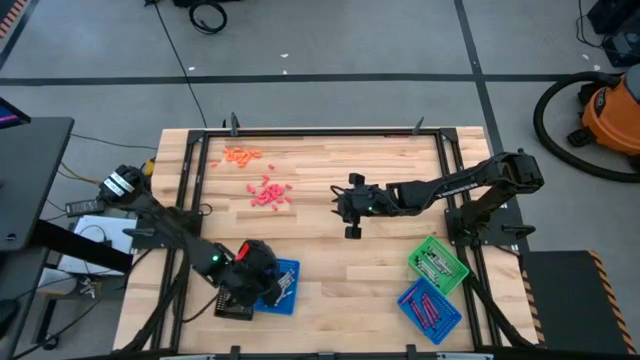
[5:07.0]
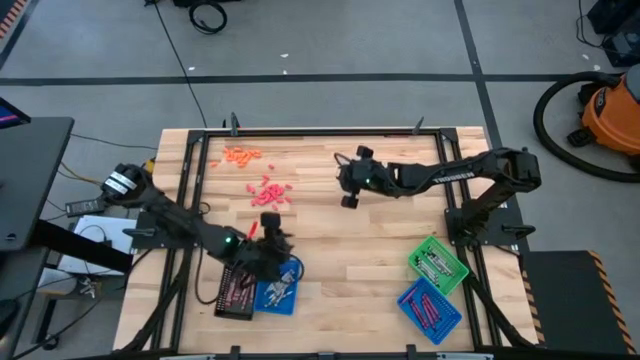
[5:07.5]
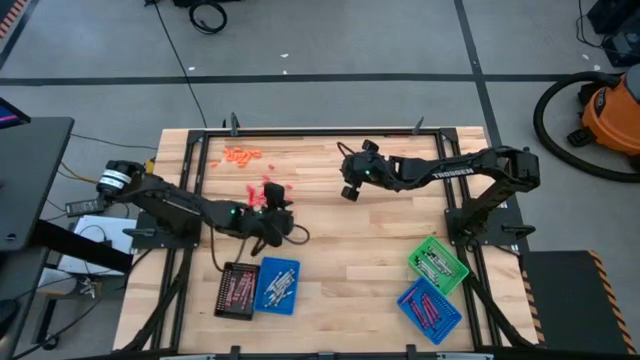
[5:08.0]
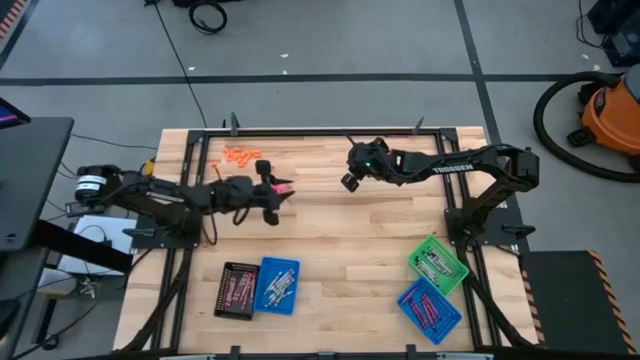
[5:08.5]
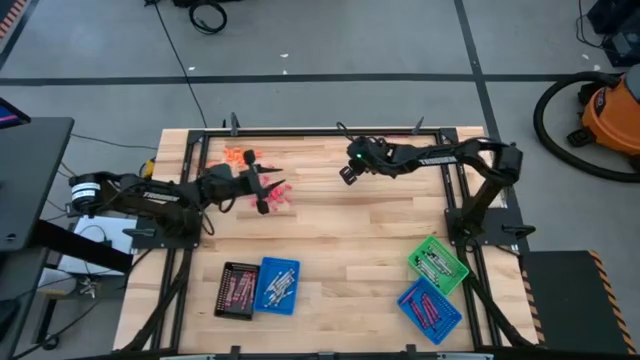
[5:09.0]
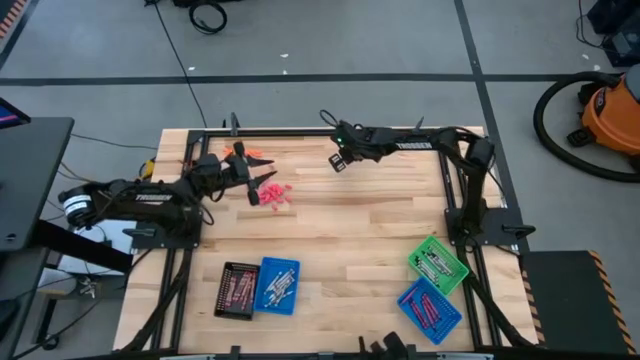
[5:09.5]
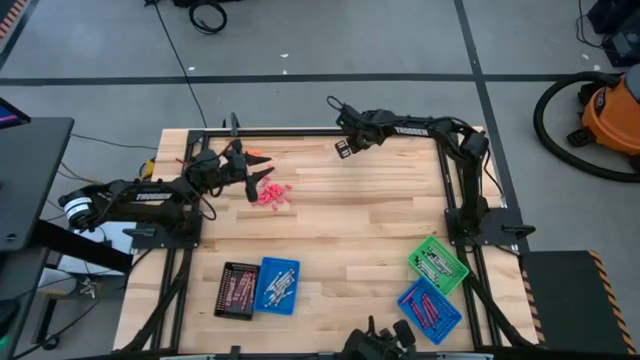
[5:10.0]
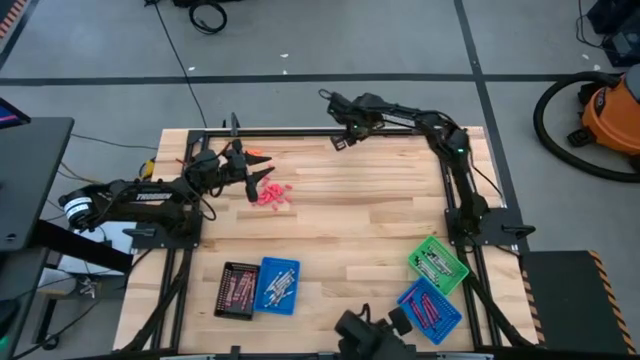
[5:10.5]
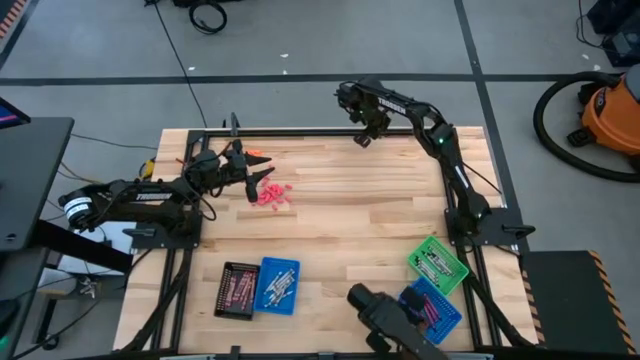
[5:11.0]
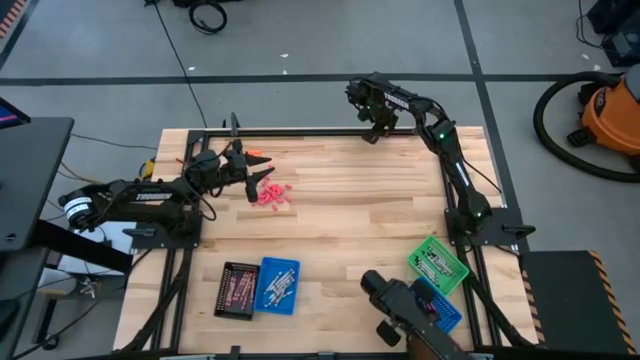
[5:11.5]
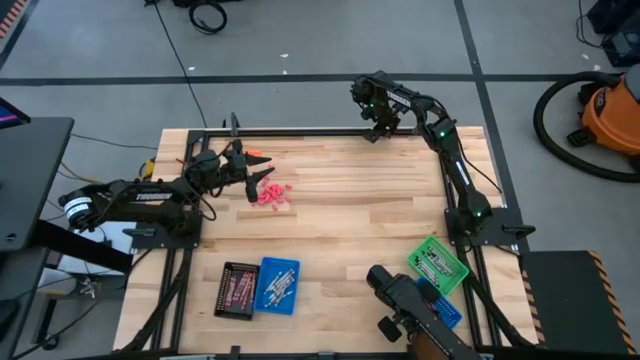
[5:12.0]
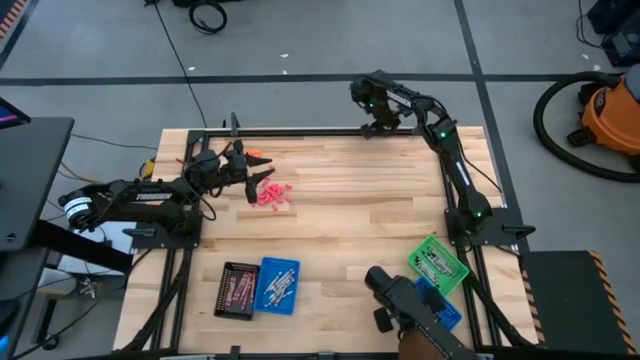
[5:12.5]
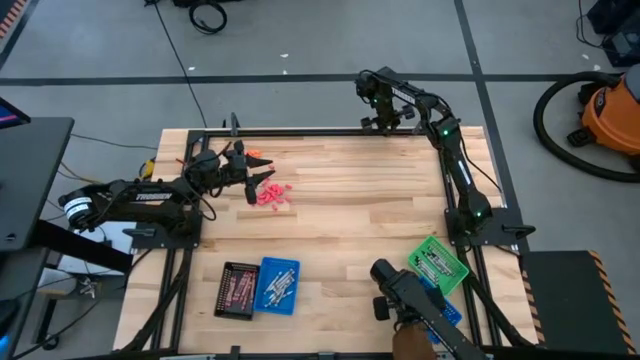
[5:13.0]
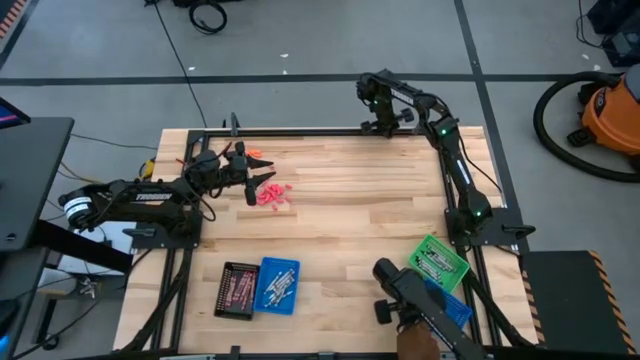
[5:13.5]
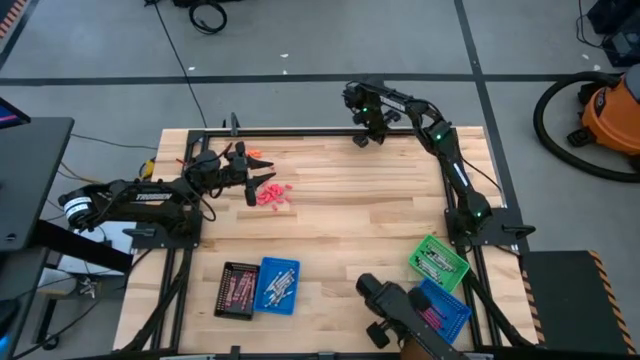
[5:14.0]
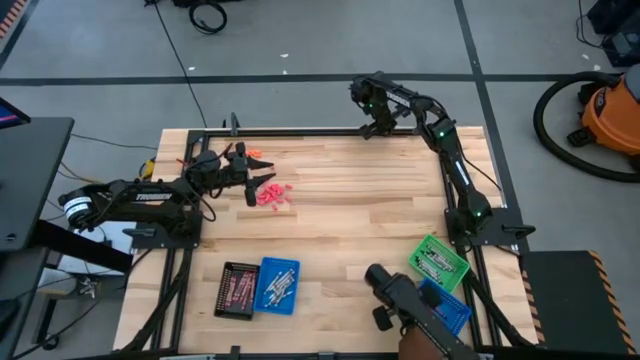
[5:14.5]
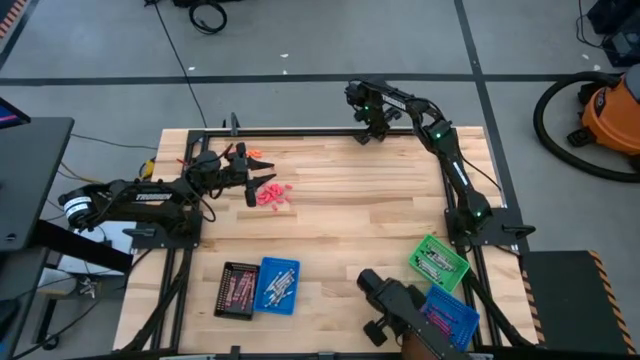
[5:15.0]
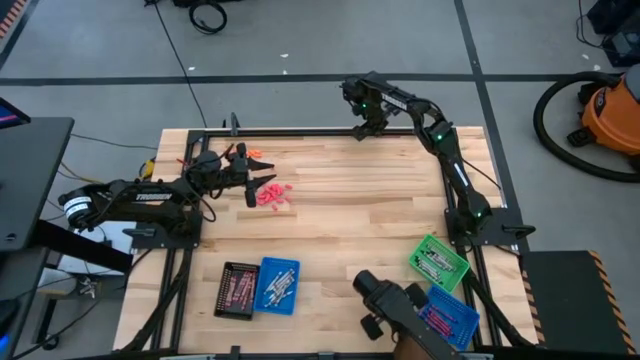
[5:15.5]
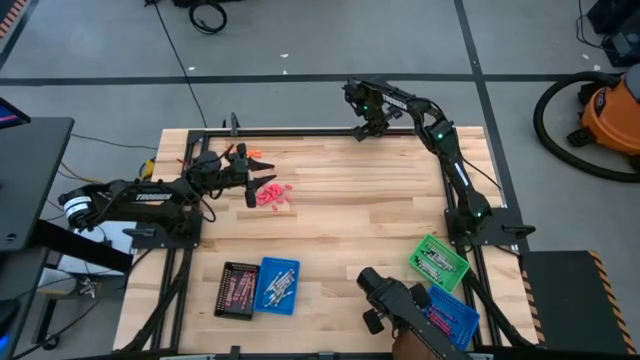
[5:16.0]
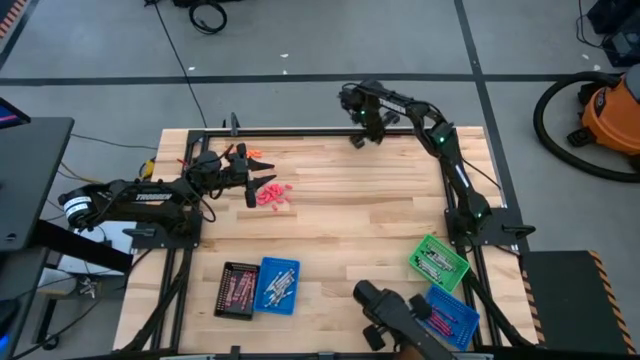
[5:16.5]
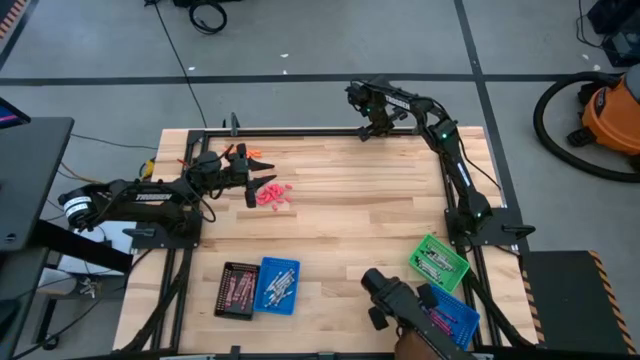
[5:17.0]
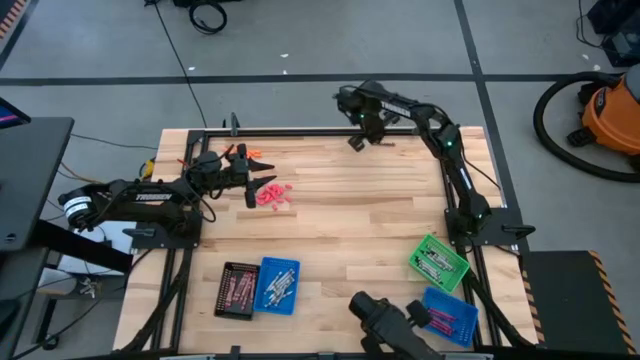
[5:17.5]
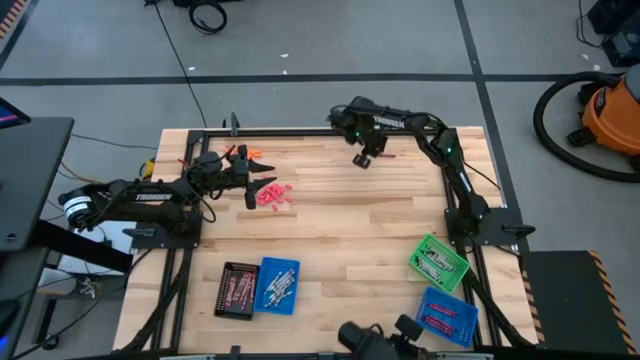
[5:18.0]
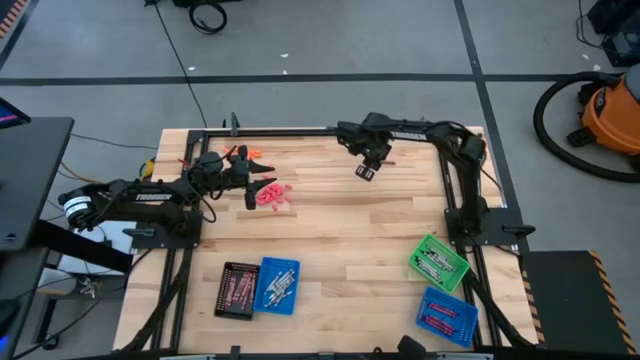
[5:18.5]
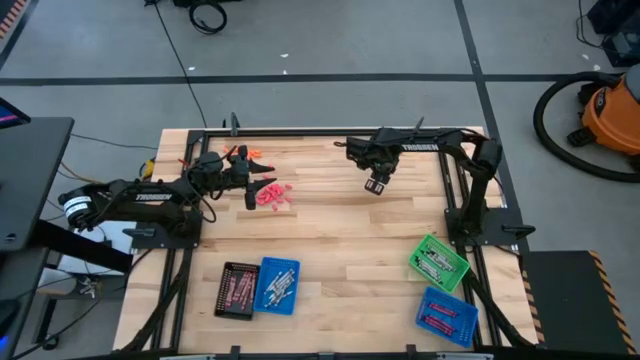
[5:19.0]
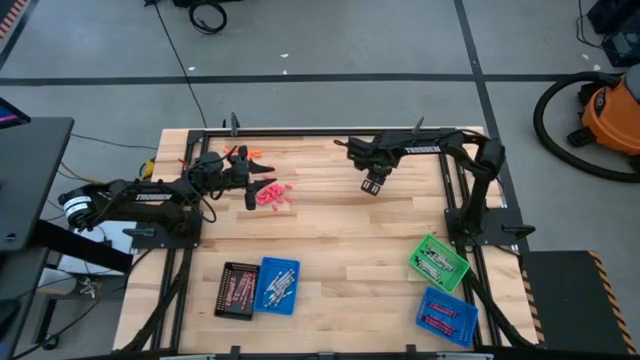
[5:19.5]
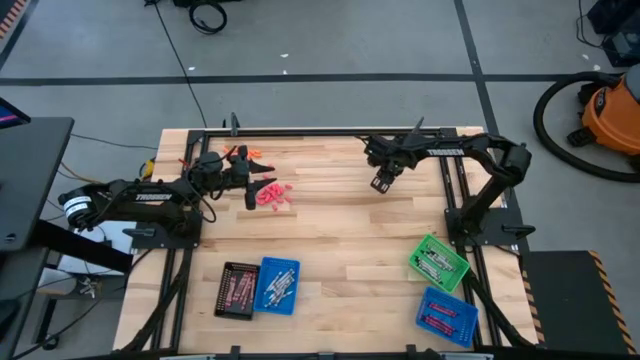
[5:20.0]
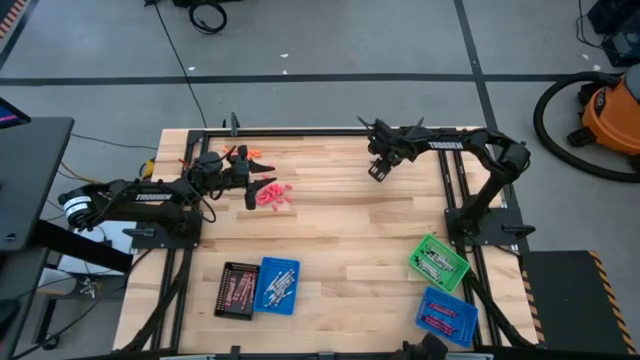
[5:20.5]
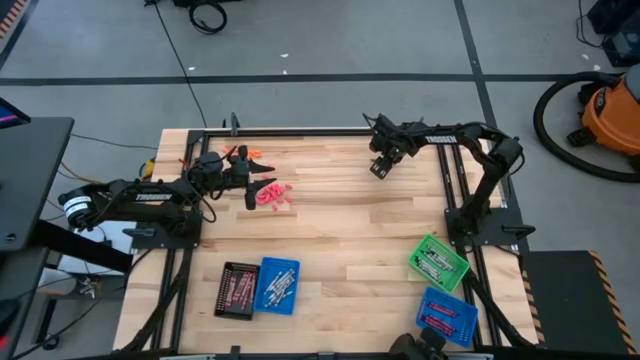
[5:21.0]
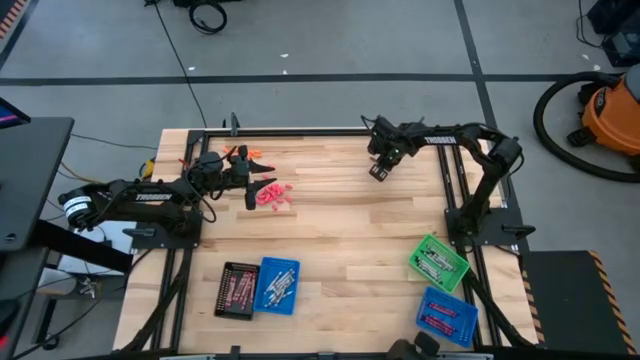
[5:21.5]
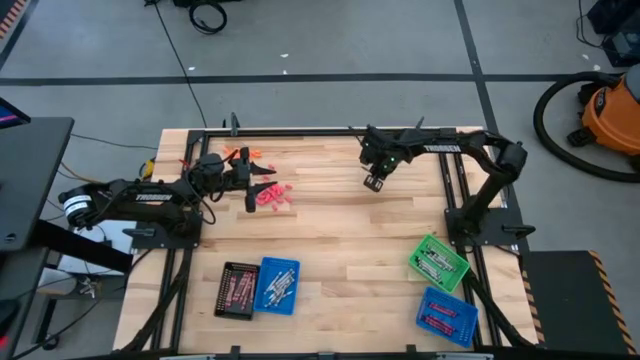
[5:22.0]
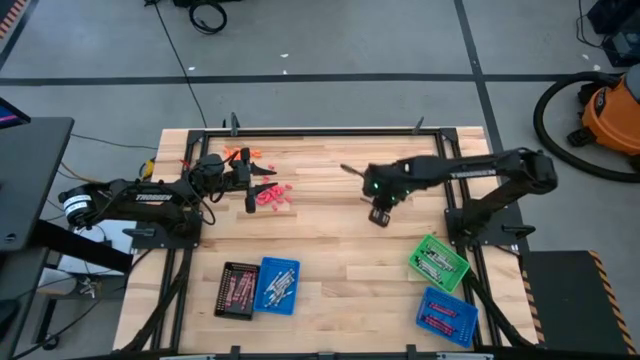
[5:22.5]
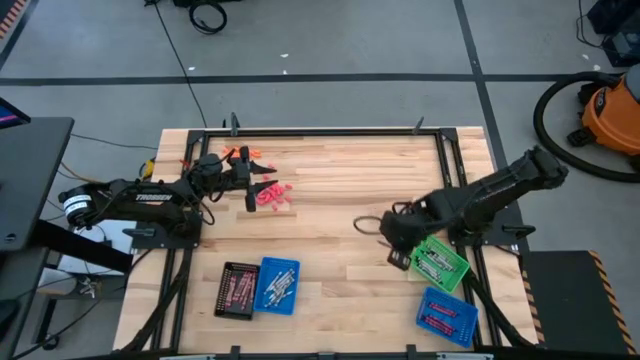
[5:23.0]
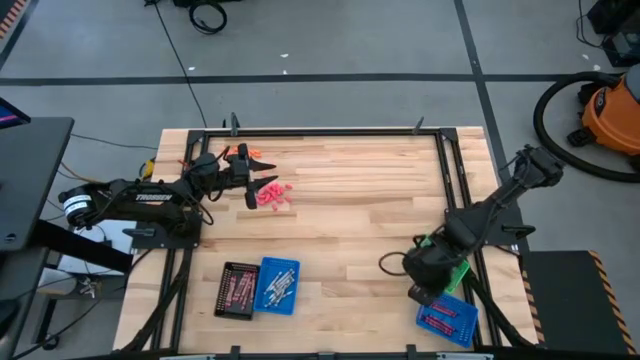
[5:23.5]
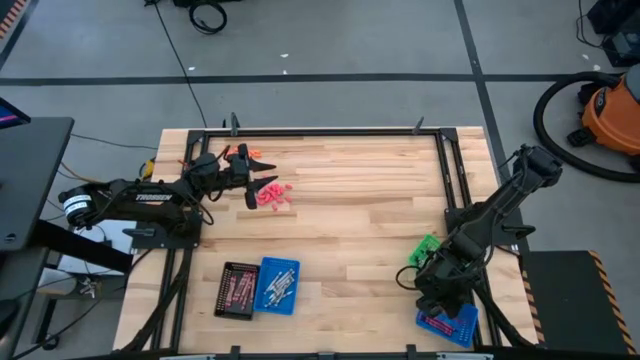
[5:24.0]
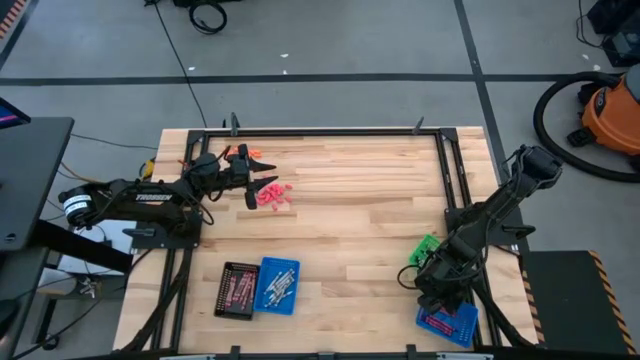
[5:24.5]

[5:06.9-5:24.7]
Task: Sort crayons
Put the red crayon into the right blue bin

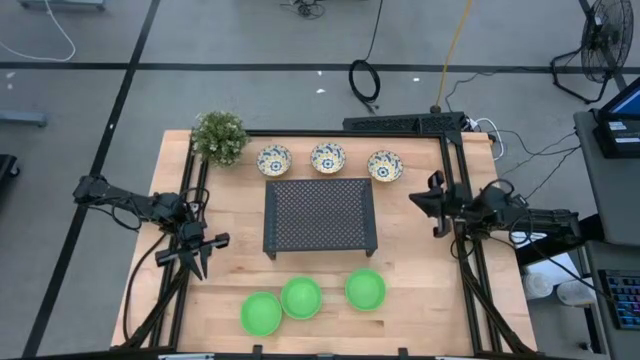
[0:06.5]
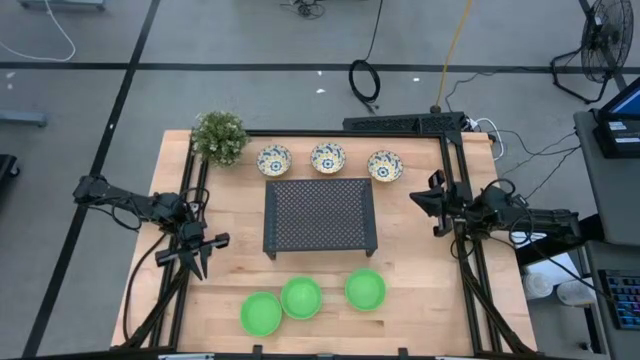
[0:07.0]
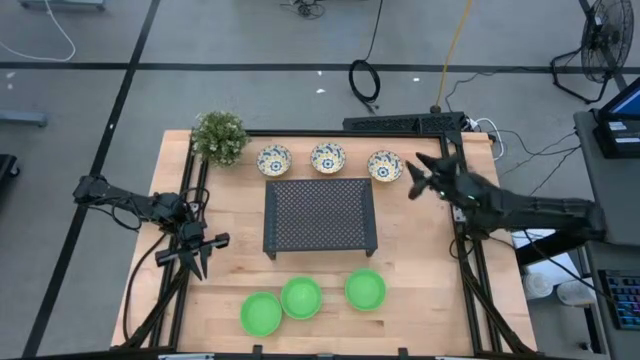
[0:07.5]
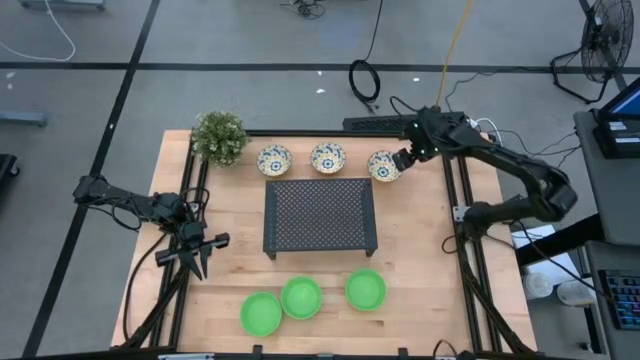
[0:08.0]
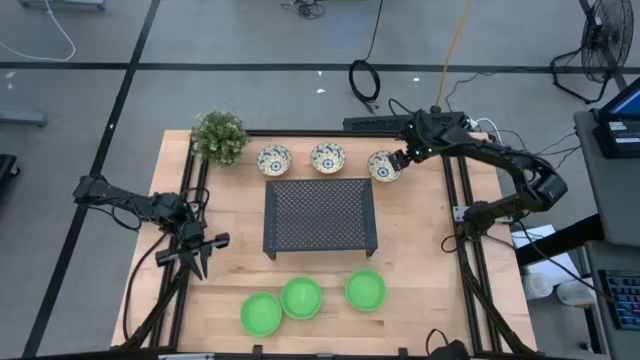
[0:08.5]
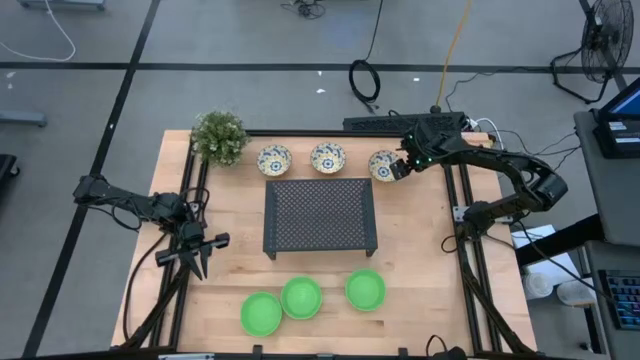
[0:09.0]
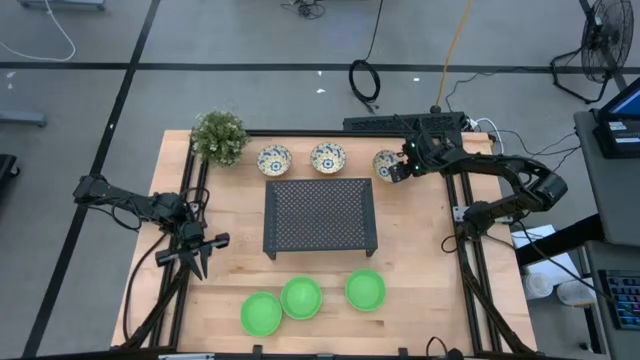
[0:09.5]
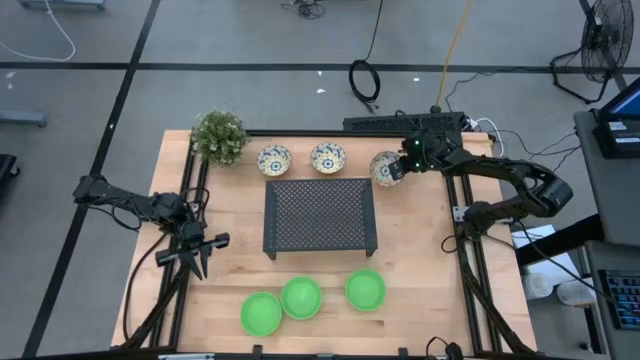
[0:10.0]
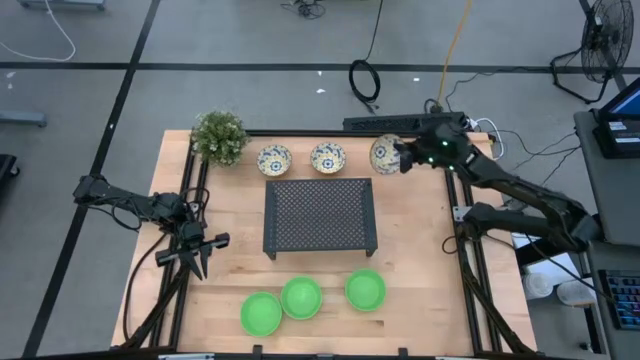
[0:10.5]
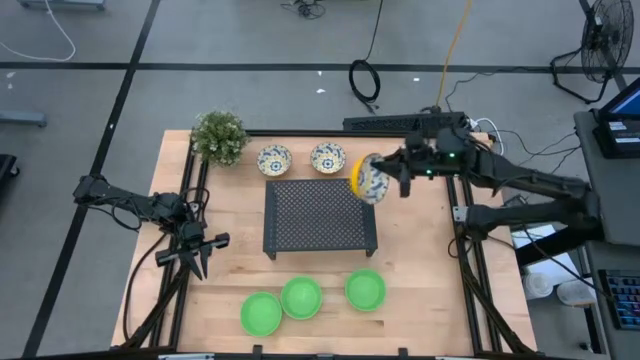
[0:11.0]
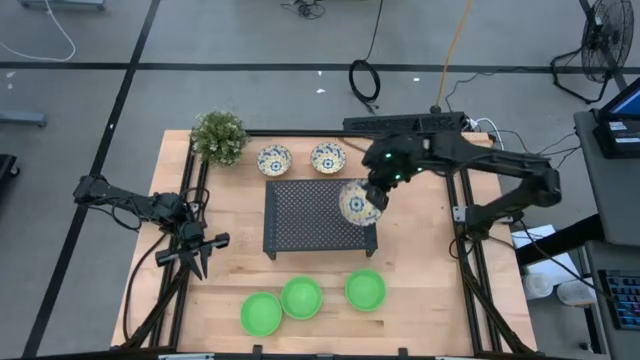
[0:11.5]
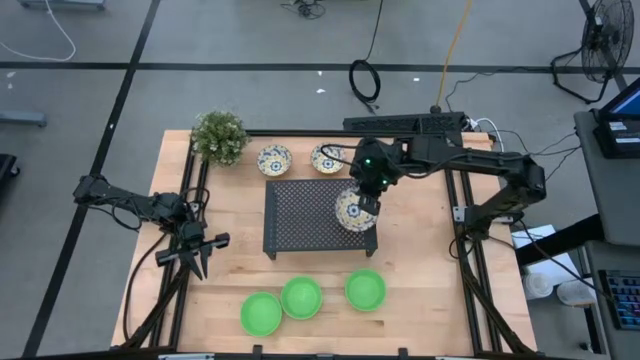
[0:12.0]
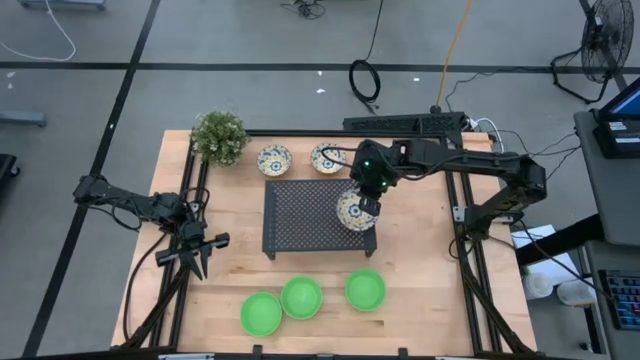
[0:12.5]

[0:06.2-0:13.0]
Task: Pick & Place Mini bowls
Put the right white patterned bowl on the shelf
